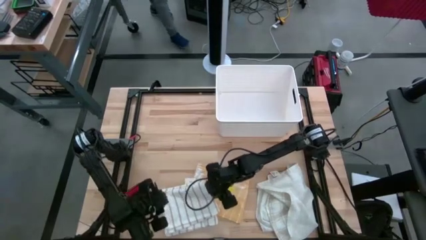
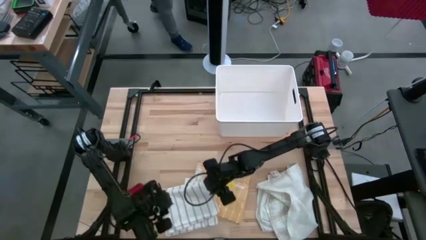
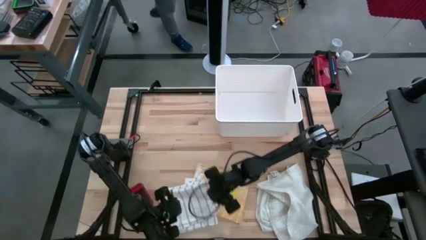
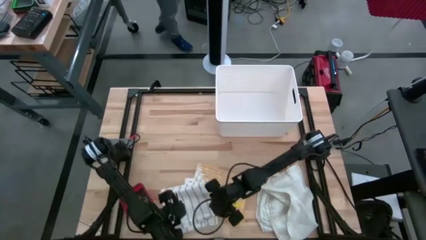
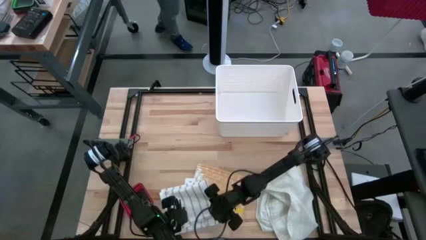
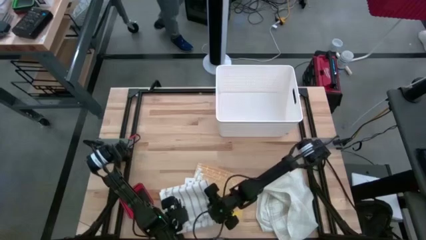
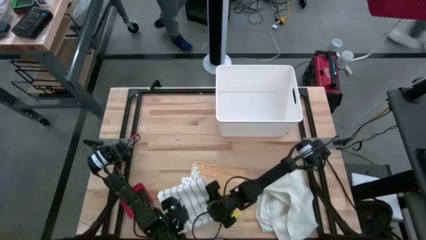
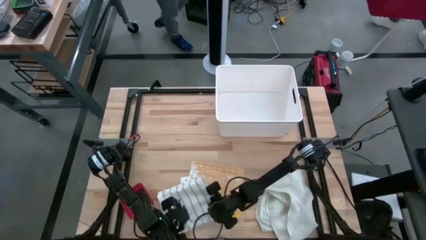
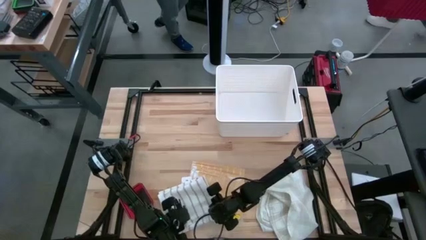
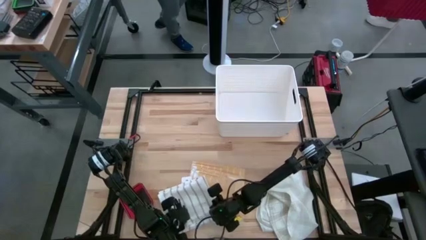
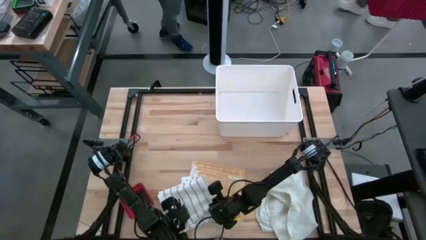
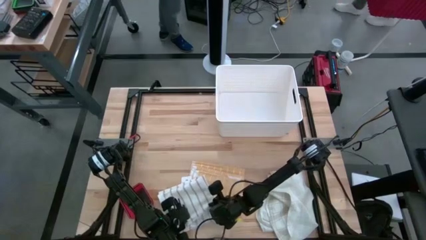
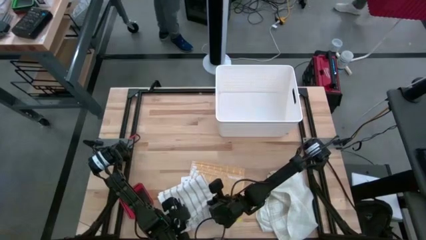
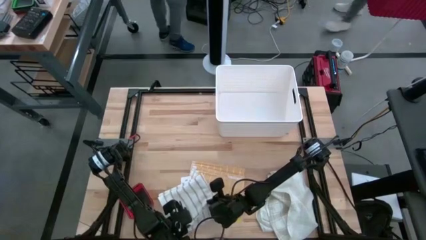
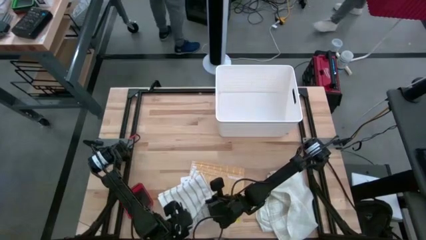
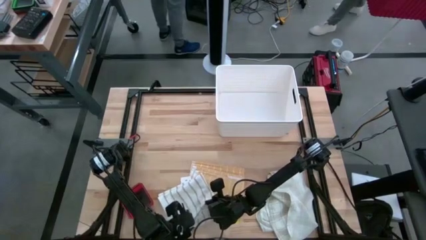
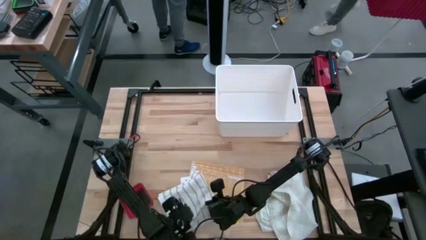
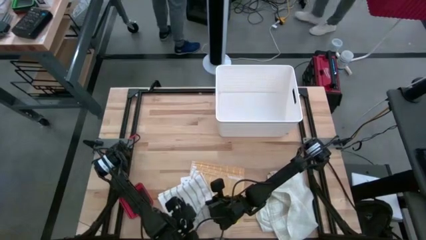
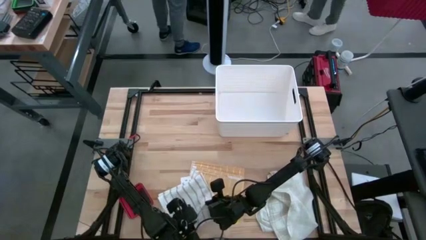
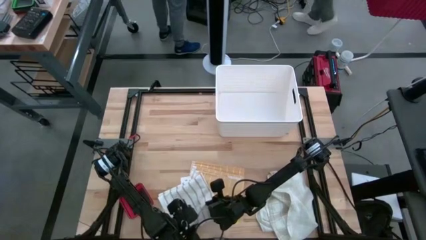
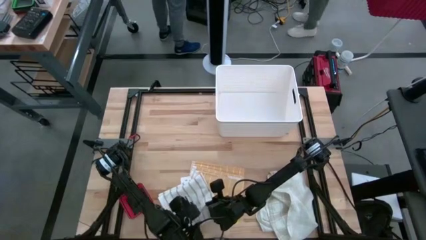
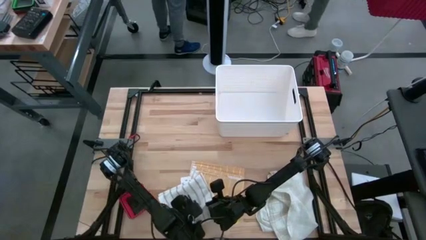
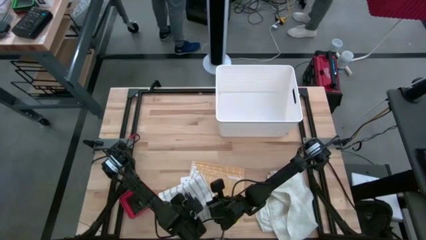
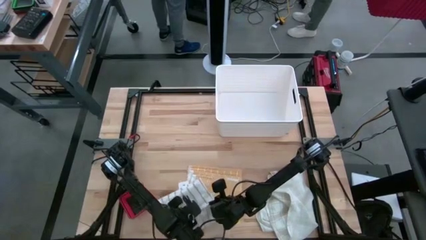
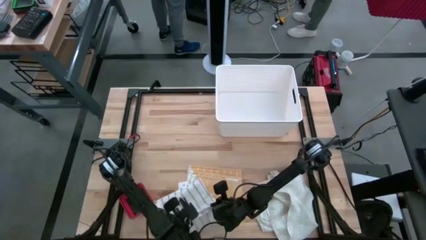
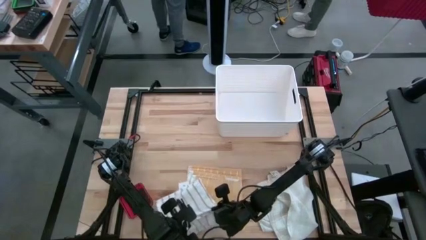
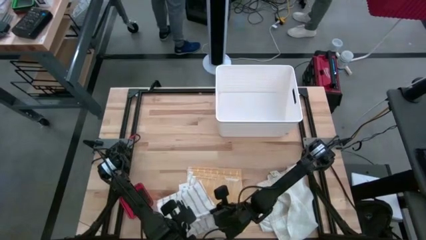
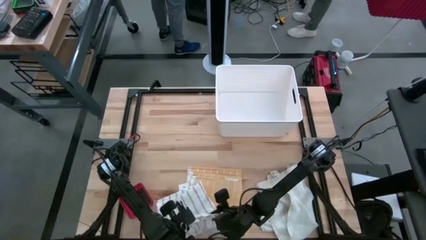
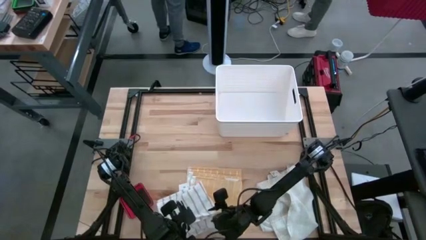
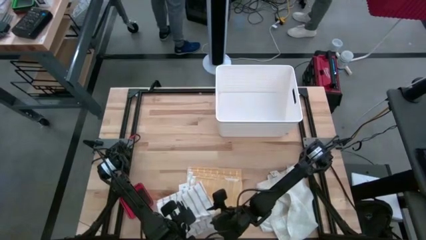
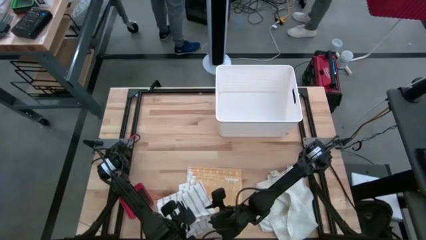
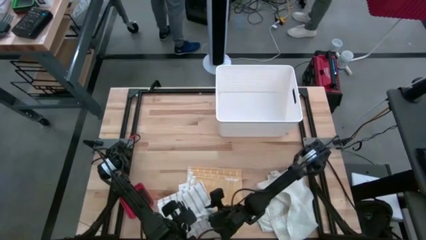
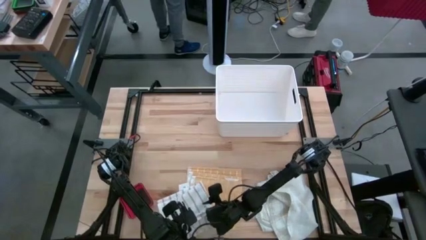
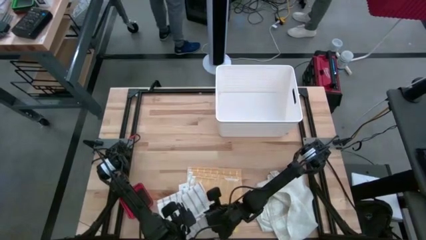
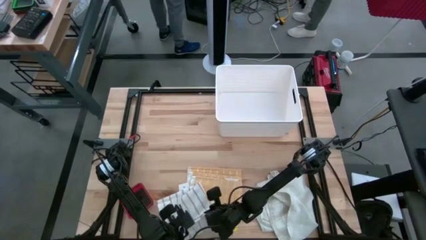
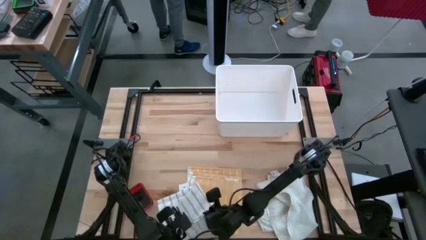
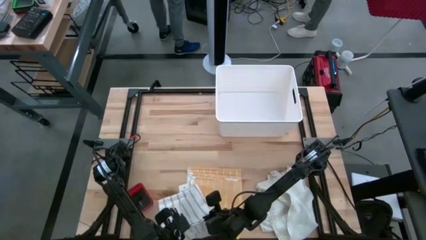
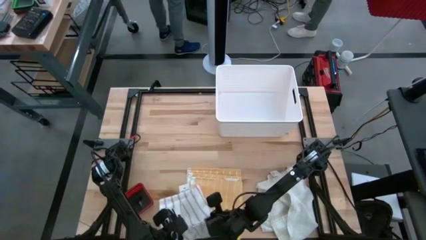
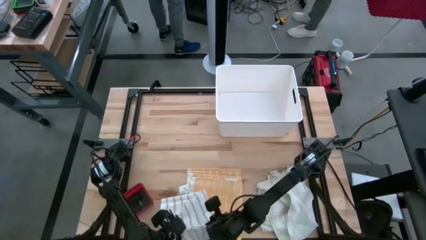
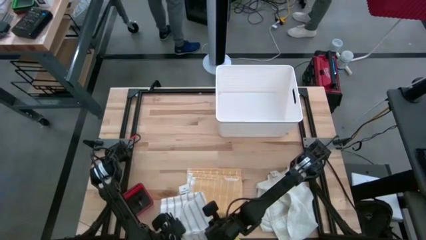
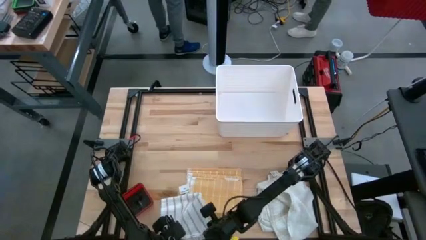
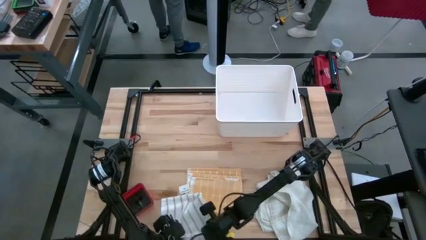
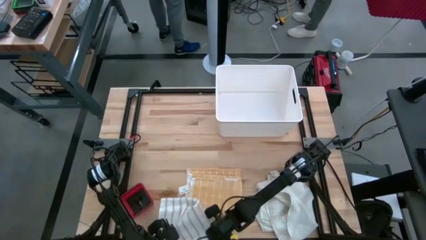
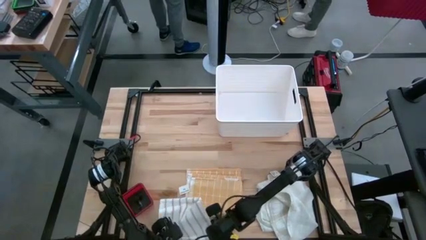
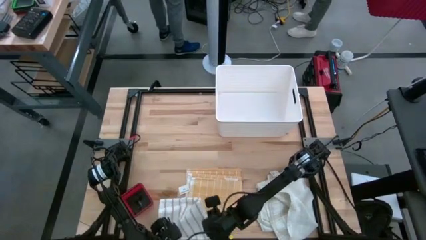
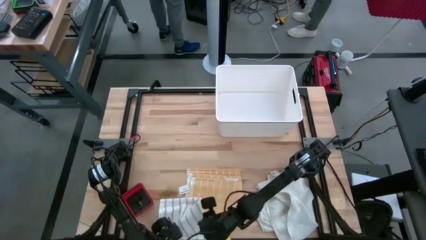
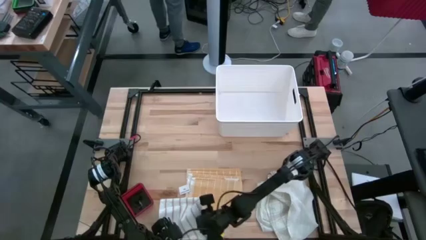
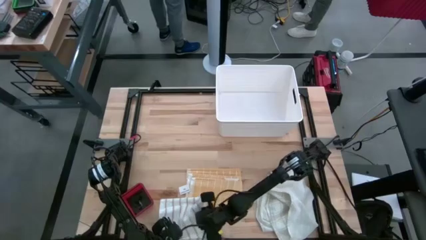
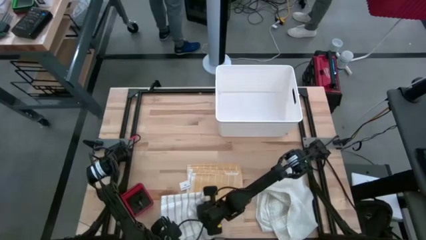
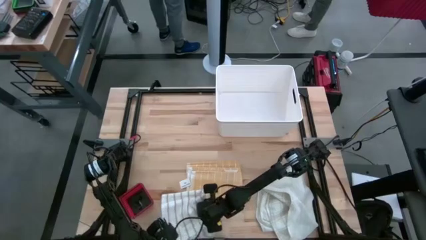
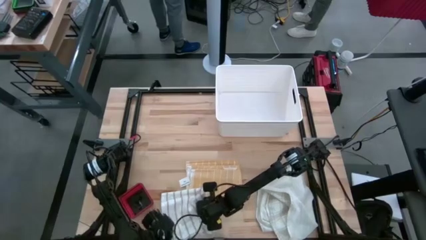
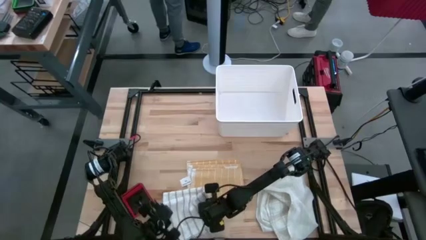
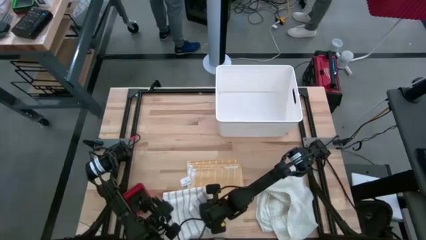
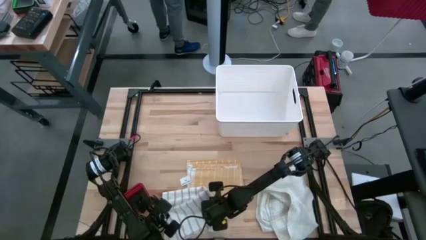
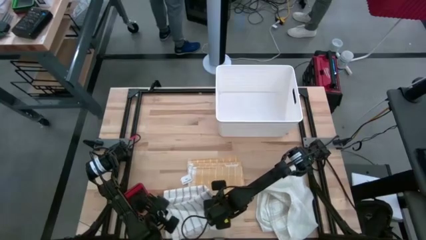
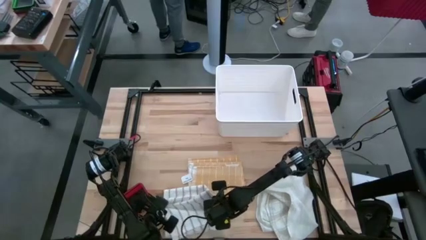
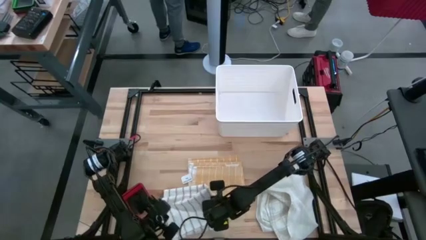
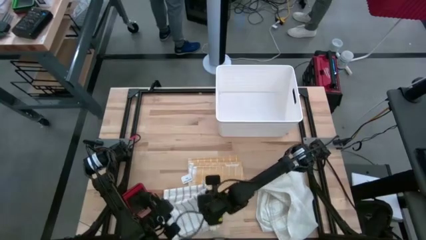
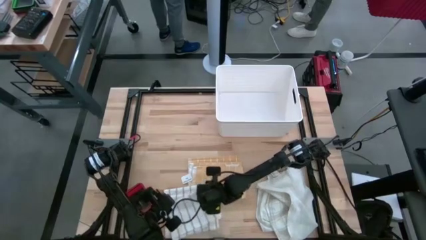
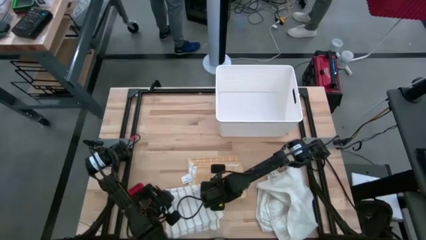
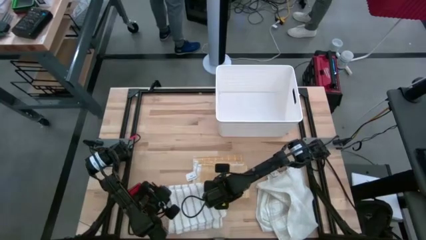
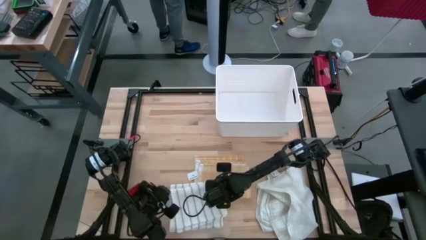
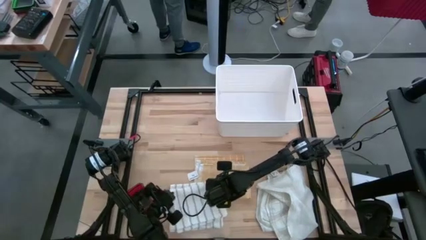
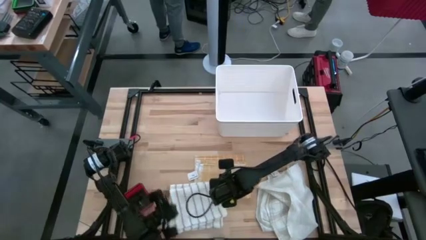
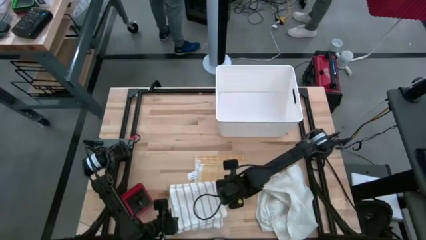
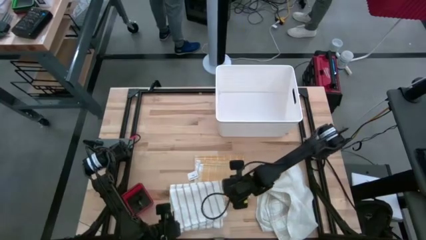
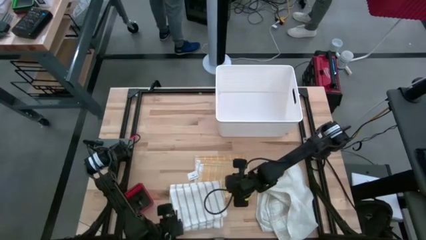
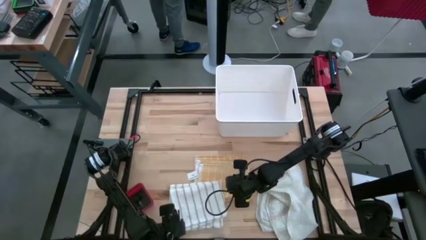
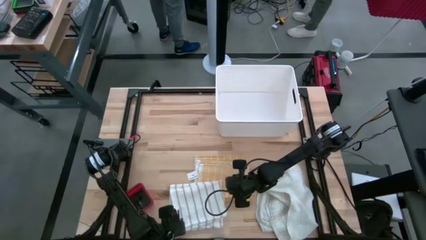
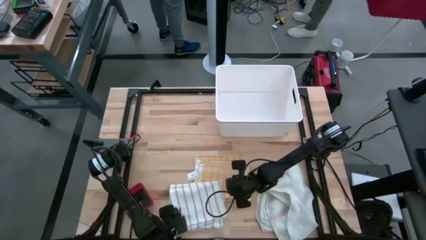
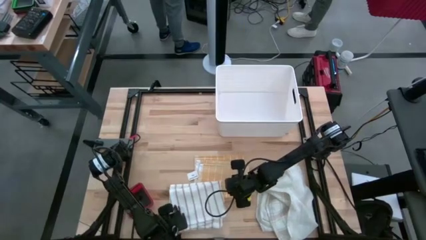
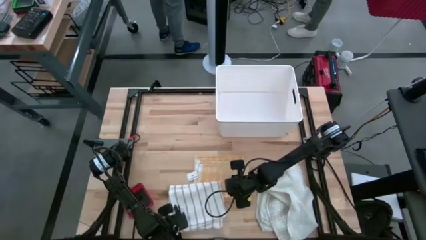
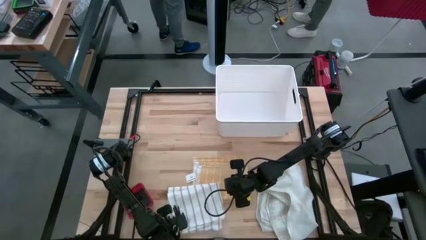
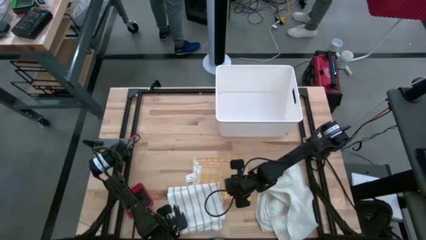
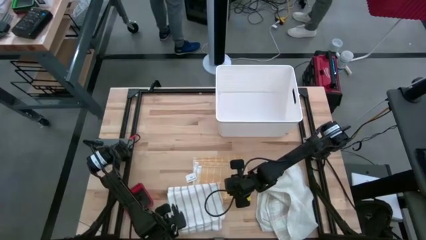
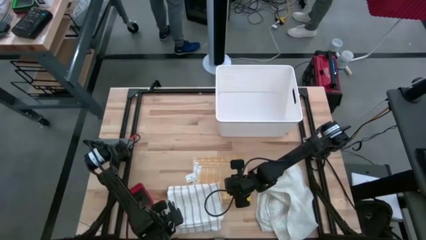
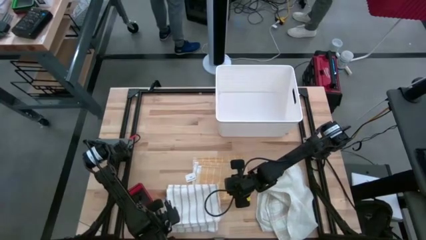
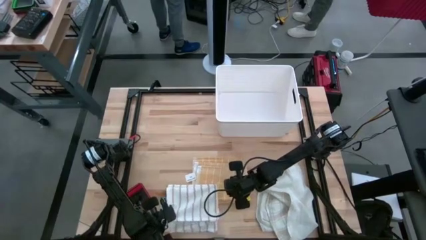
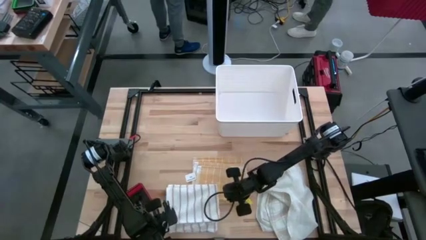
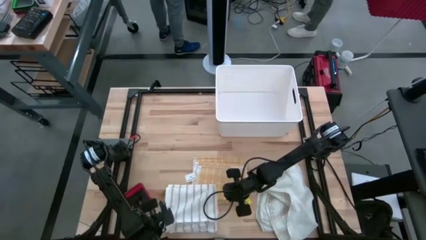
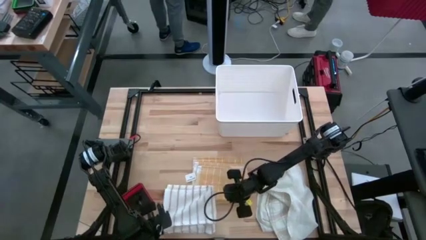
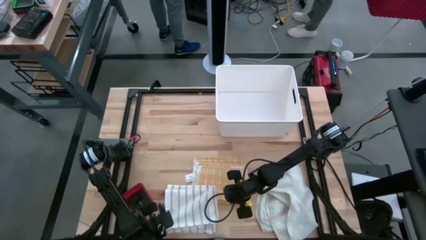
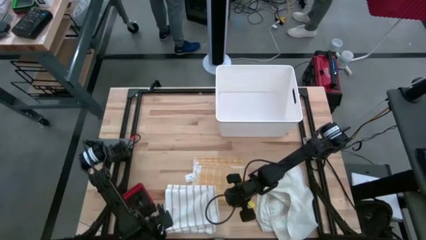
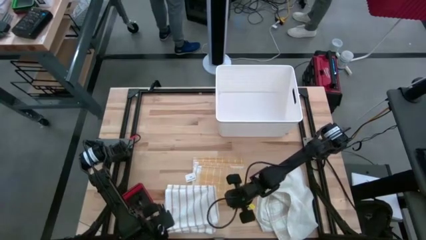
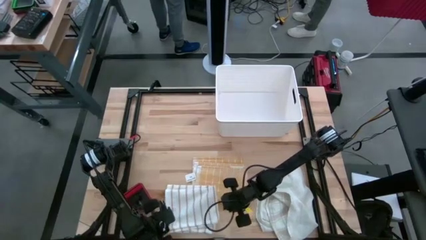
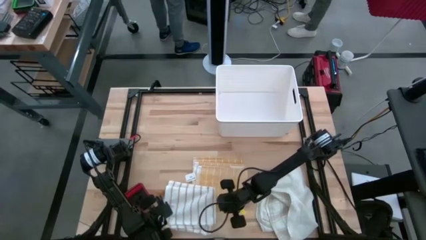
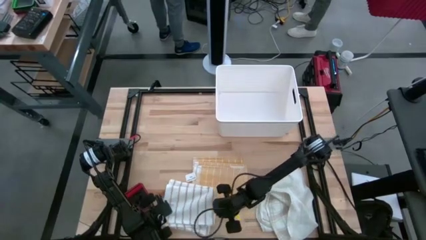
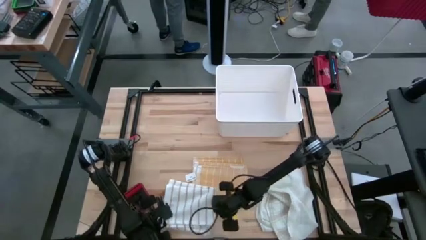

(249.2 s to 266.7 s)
Task: Fold towel
Fold the brown patterned towel
